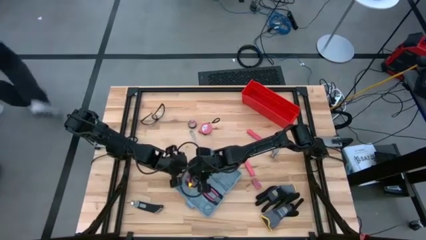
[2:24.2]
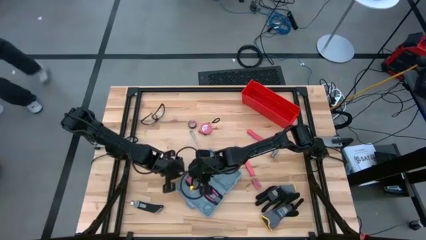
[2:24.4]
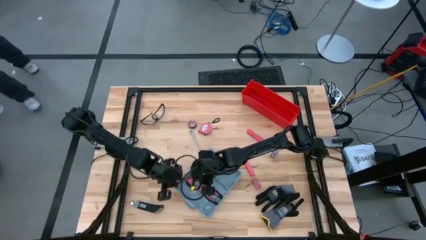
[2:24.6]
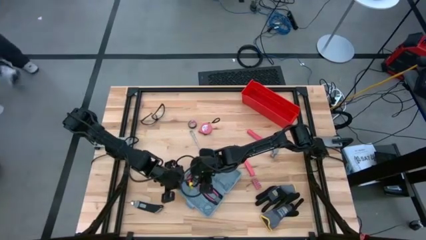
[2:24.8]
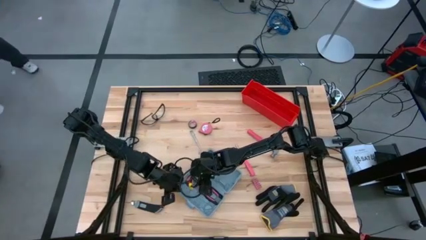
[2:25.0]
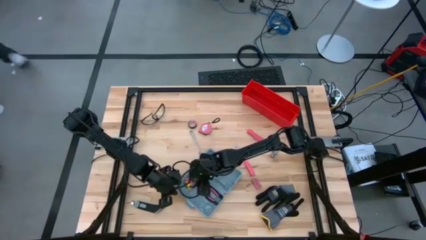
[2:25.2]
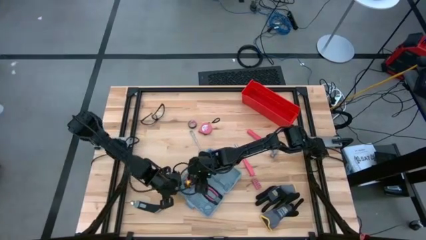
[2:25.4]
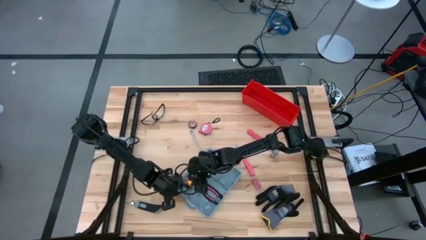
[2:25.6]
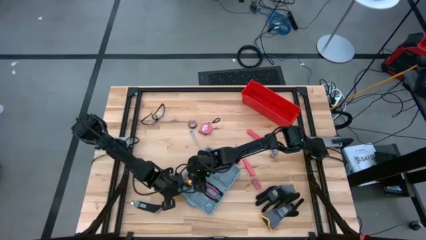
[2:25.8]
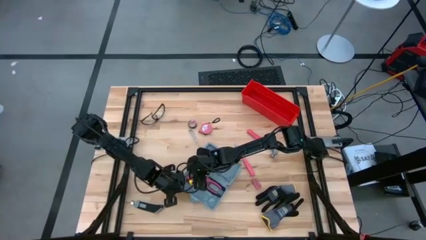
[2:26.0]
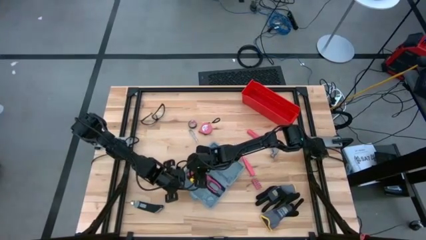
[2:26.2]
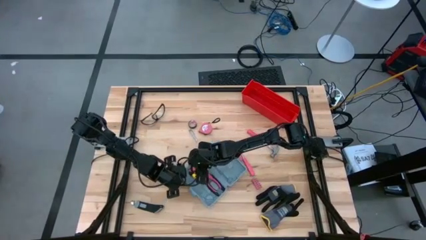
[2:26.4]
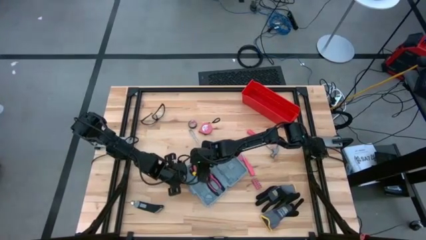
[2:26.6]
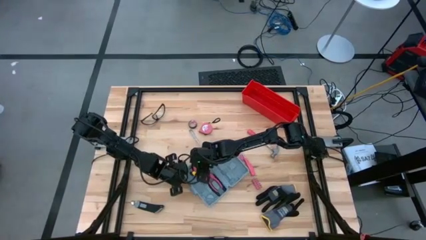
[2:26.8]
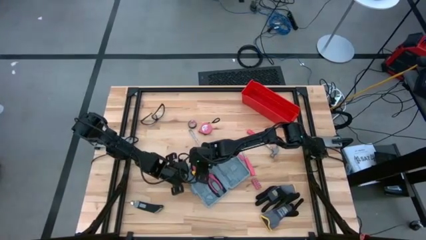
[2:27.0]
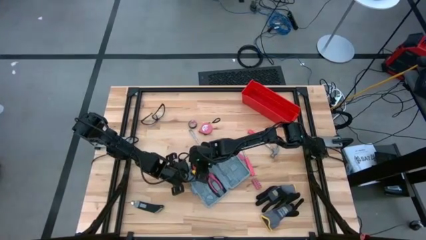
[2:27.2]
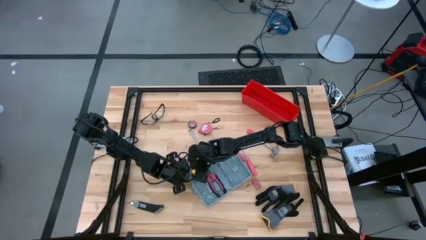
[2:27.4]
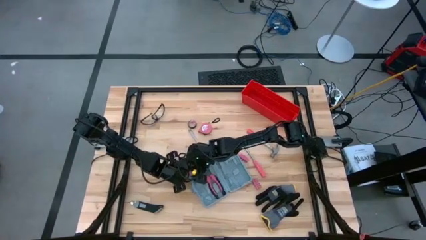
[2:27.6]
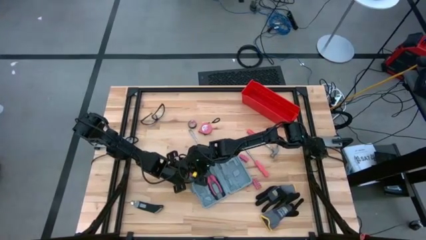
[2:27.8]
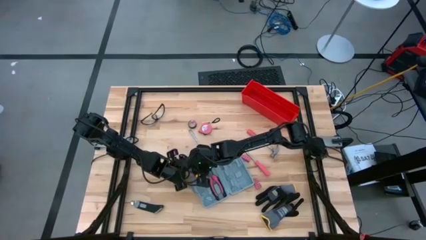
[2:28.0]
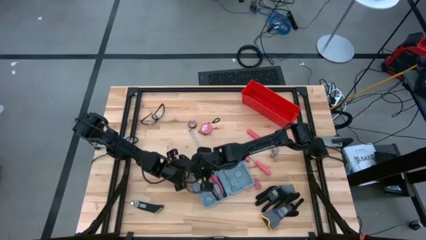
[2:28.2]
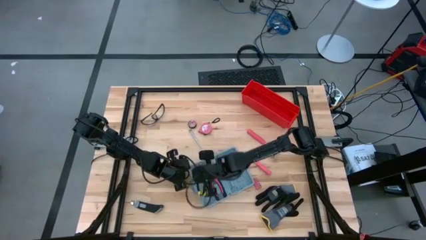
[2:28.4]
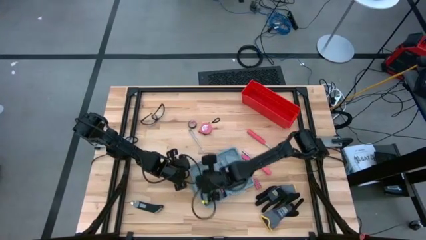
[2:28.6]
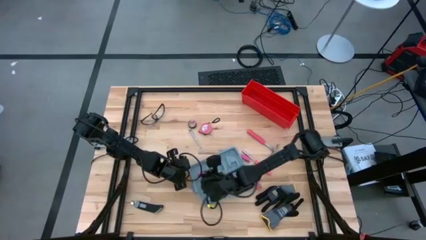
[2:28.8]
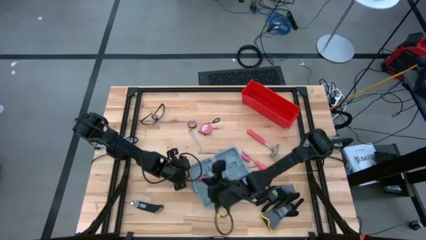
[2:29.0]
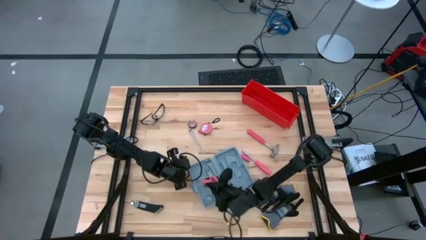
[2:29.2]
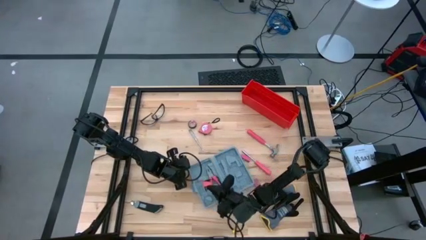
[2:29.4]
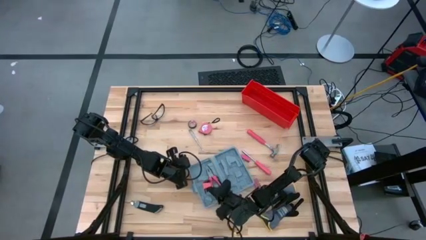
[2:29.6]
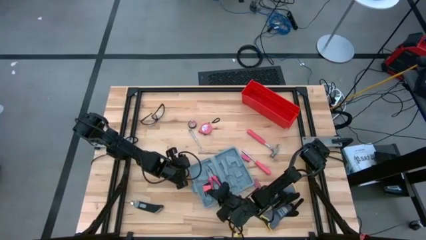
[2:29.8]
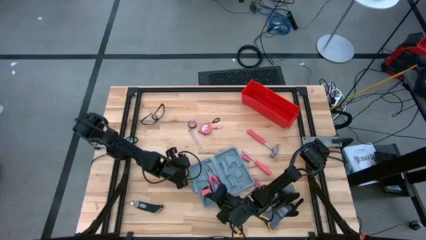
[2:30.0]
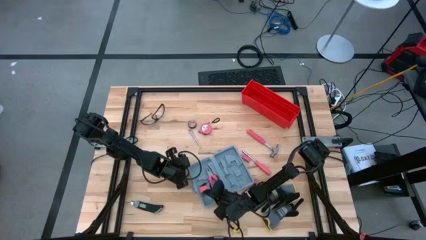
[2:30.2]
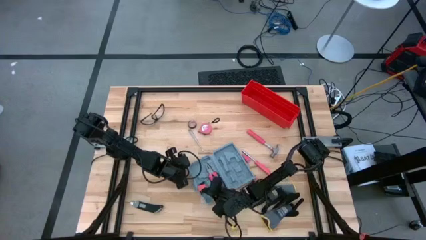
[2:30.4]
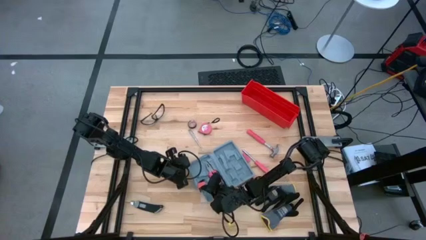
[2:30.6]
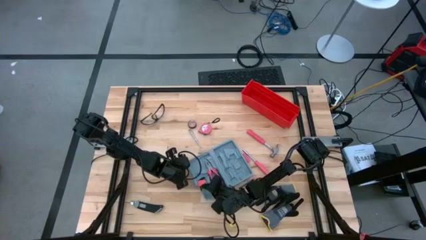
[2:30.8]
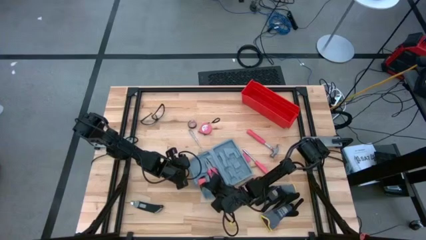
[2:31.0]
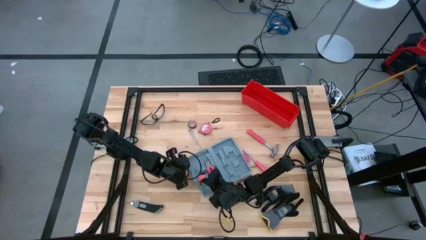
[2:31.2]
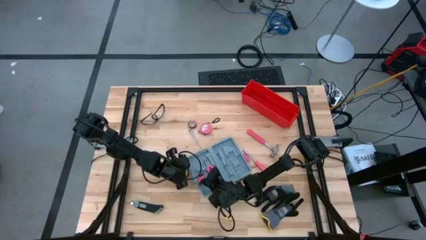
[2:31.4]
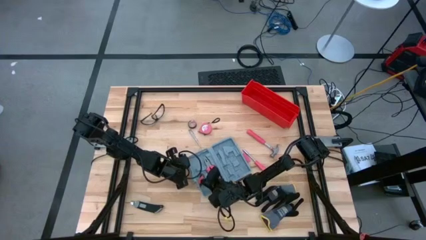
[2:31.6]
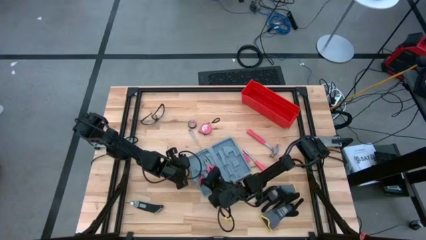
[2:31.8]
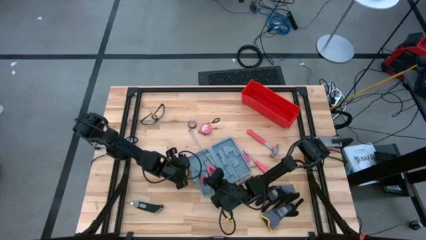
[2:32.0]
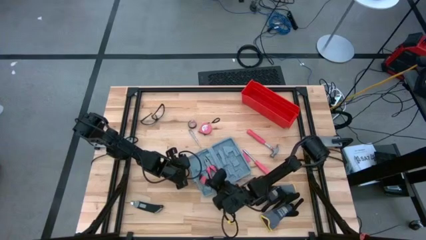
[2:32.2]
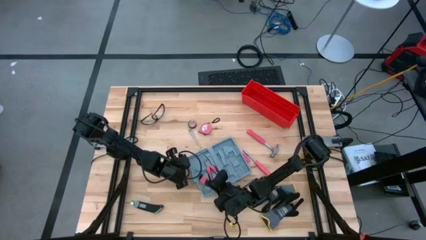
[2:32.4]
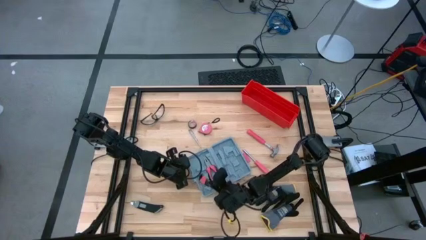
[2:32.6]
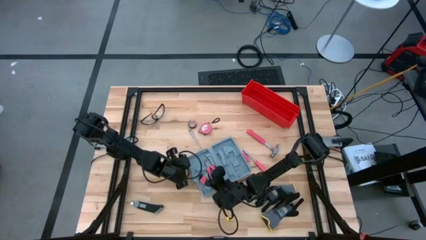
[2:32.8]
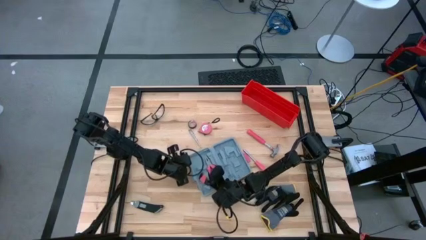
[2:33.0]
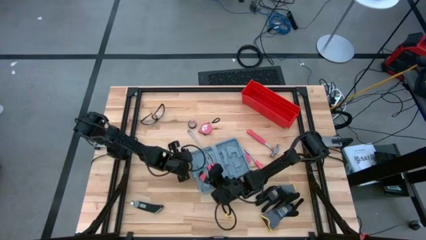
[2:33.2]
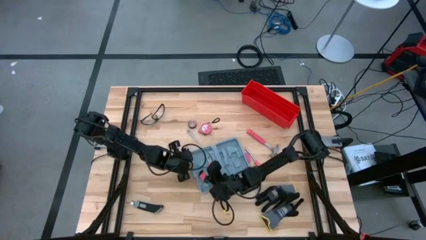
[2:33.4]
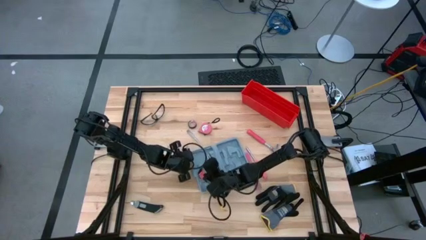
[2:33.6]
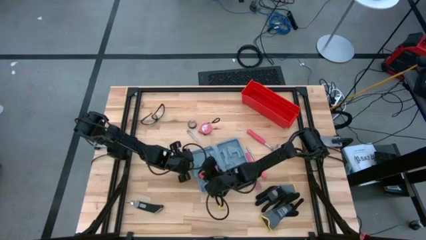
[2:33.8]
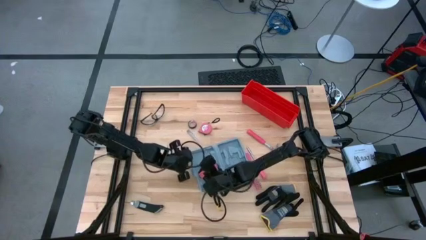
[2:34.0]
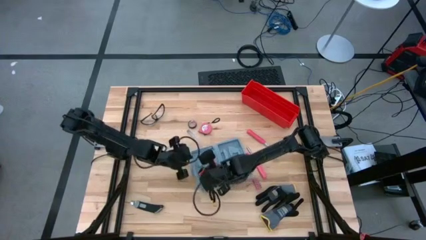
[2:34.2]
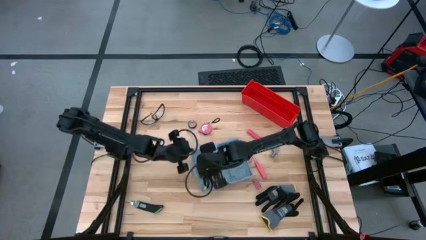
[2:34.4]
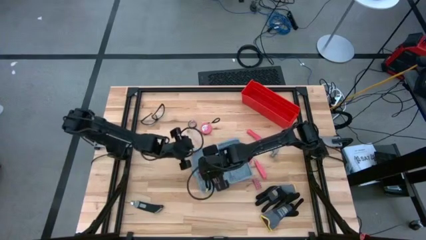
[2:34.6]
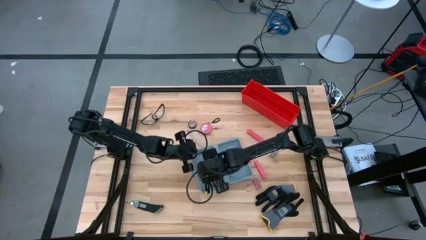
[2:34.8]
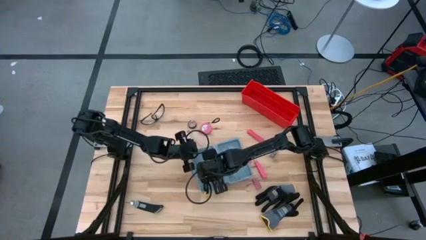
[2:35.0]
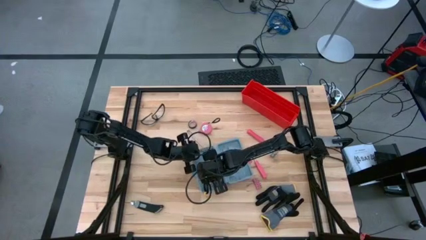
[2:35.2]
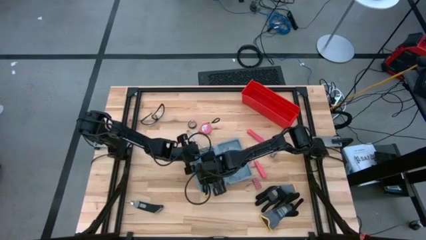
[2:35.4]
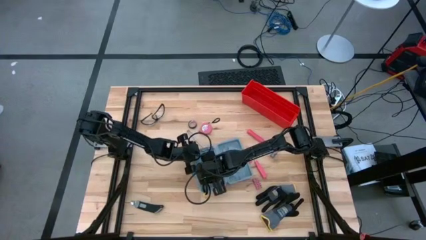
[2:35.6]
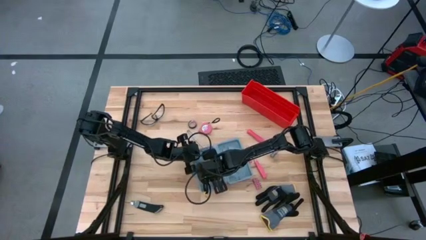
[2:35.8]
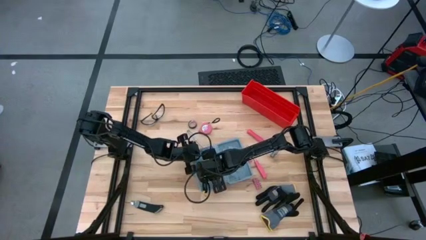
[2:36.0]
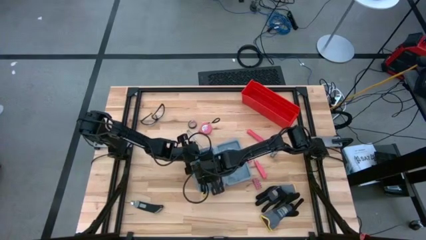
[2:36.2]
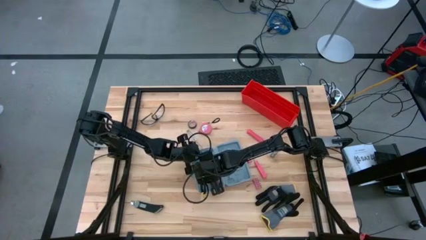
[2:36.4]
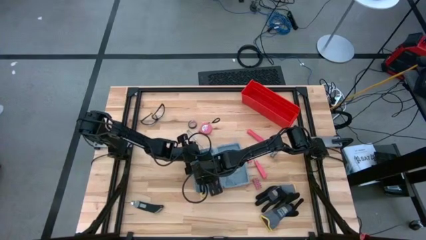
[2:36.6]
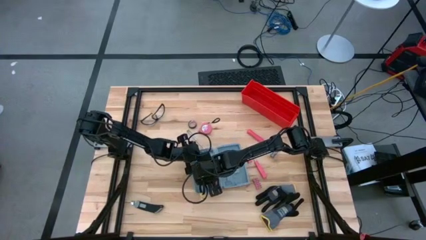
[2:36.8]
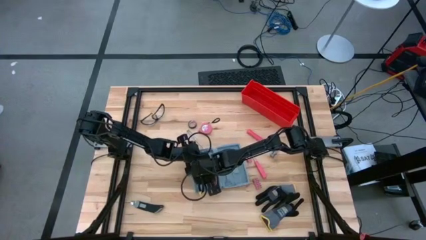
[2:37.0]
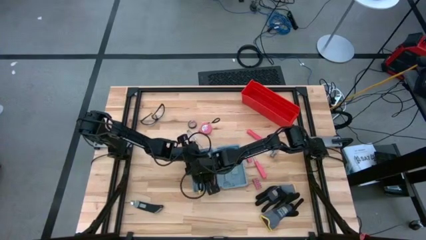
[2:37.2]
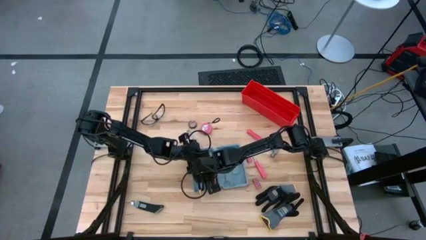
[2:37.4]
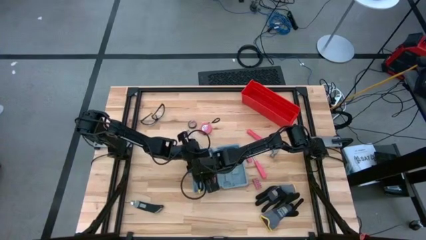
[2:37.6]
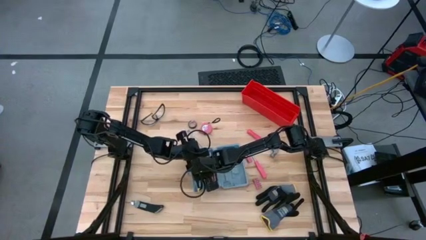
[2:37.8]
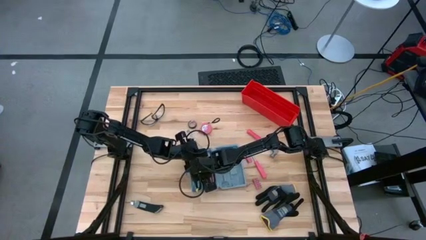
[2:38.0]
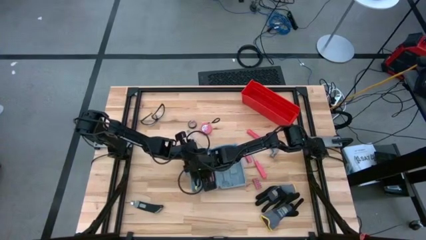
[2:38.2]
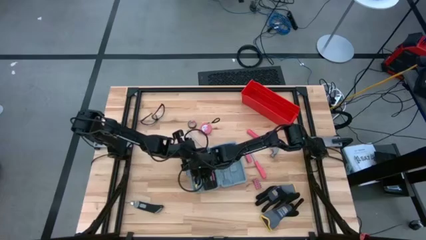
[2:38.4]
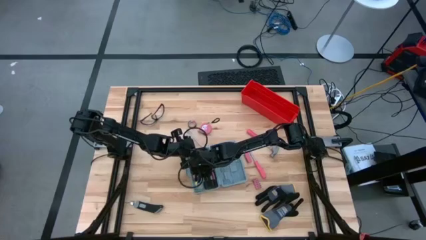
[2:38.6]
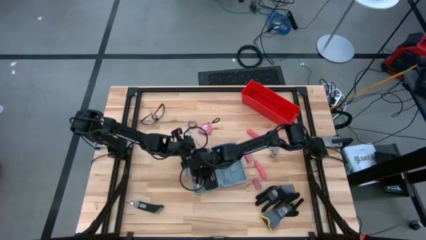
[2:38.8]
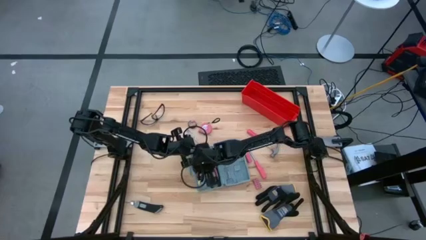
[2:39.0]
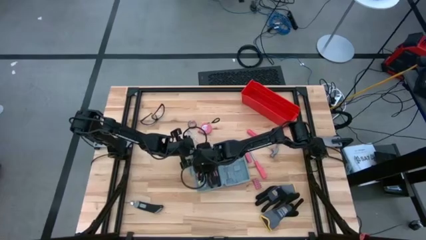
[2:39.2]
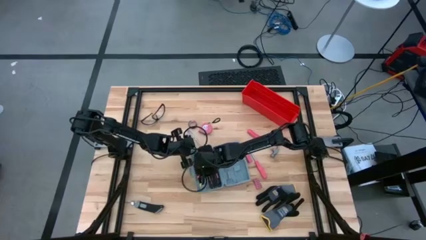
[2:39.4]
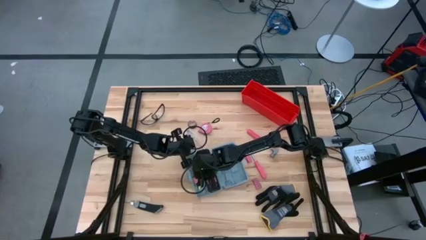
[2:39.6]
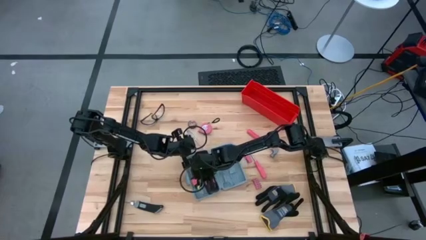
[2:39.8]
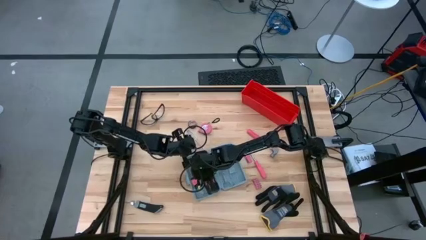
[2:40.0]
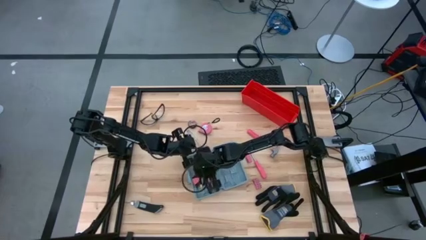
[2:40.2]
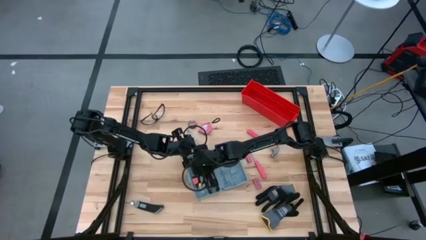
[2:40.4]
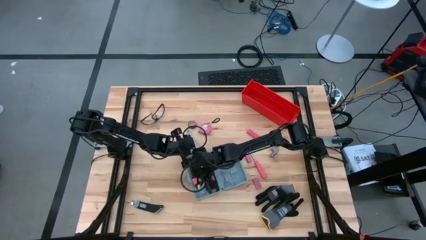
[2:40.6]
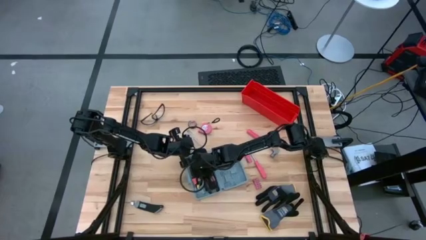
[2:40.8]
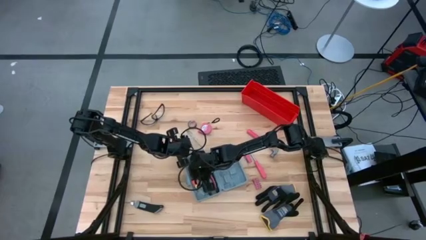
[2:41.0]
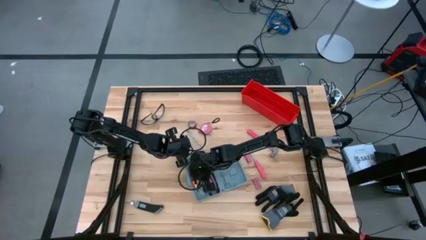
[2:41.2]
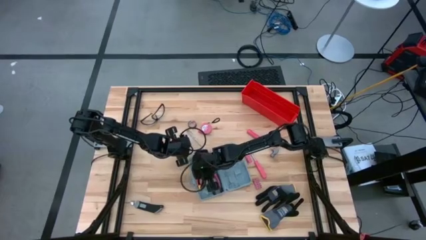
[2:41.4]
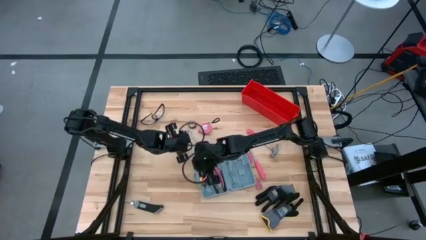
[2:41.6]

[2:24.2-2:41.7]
Task: prefit tool cases
Put the hex key set into the toolbox
